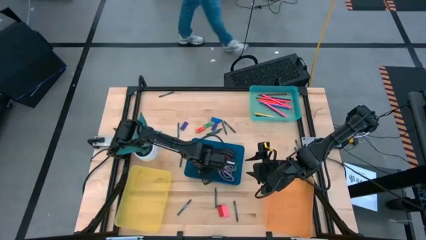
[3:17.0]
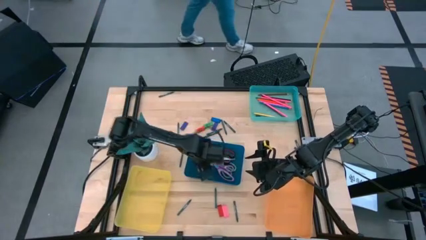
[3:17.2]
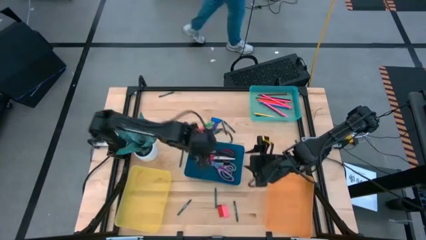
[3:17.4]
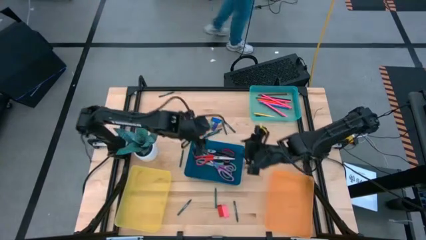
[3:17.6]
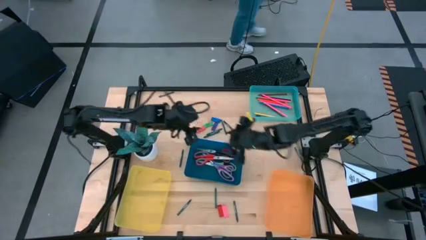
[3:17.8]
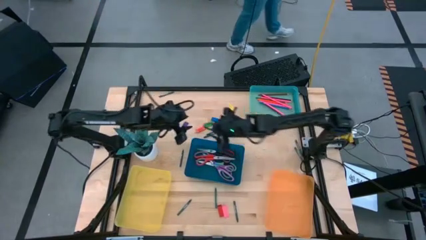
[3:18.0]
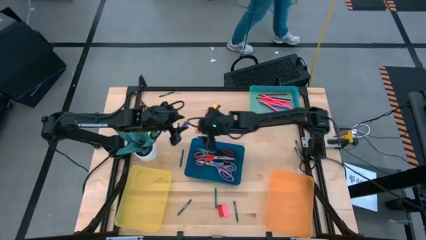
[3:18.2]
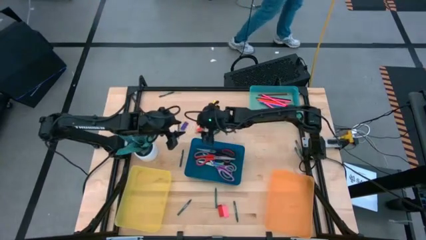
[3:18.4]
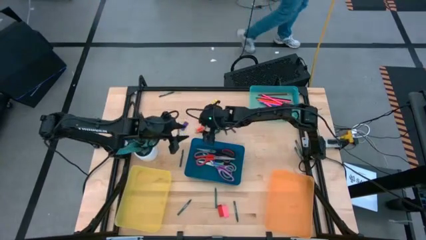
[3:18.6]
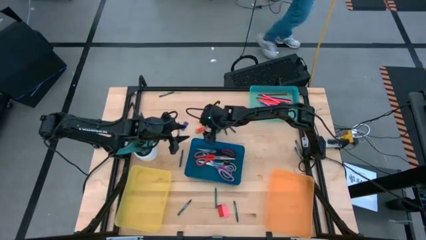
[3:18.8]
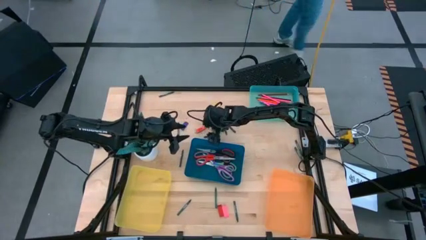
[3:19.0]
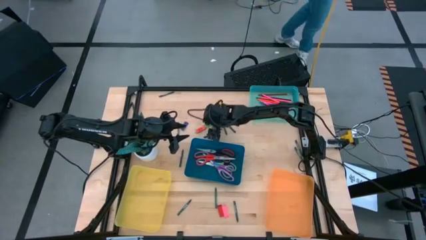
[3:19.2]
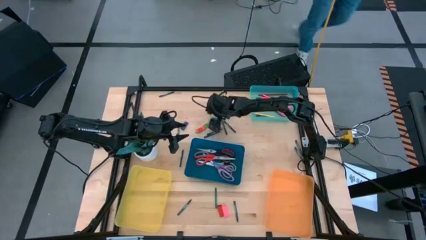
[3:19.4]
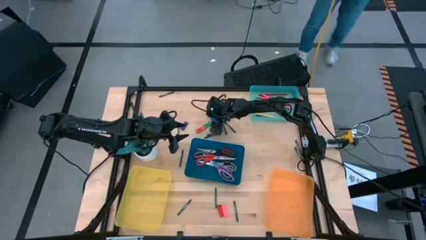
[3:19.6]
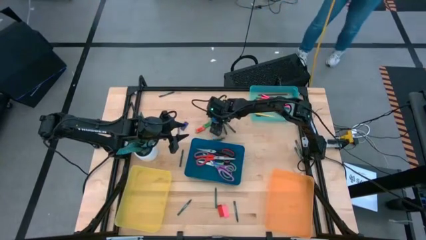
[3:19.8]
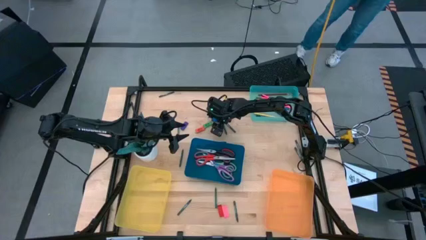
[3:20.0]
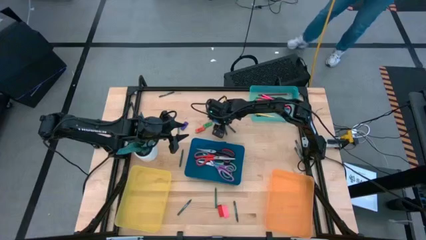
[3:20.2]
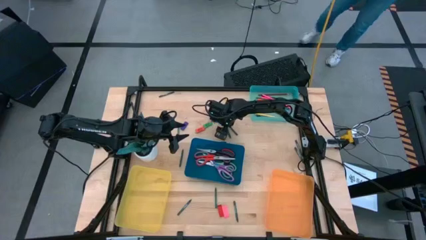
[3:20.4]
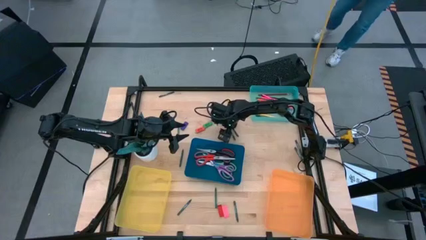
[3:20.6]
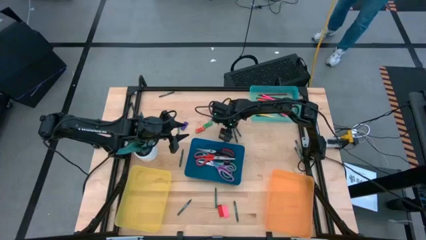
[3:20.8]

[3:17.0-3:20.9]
Task: Sort crayons/erasers/pens/pencils in bins
Adjust the blue eraser

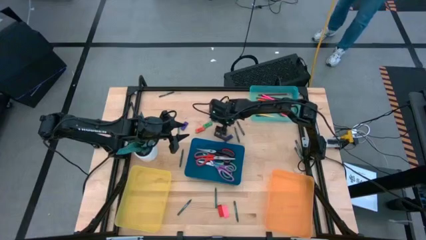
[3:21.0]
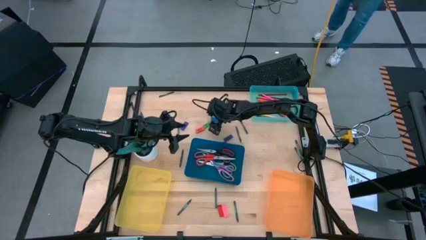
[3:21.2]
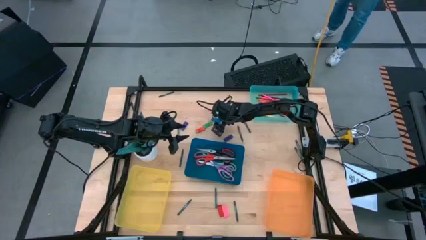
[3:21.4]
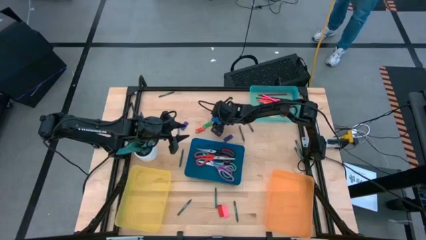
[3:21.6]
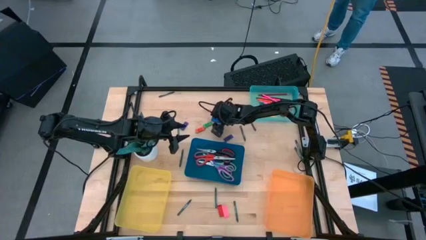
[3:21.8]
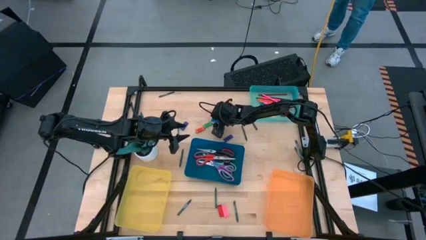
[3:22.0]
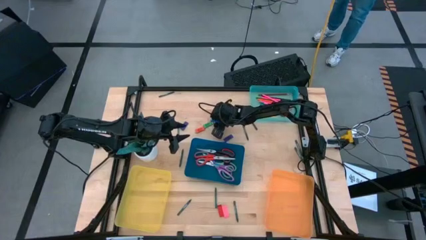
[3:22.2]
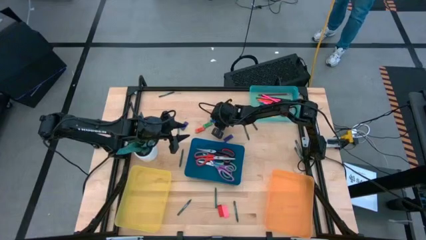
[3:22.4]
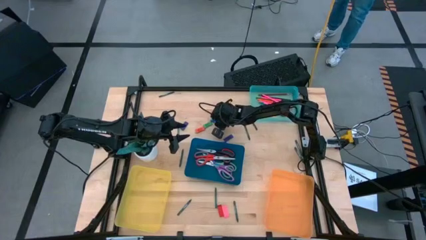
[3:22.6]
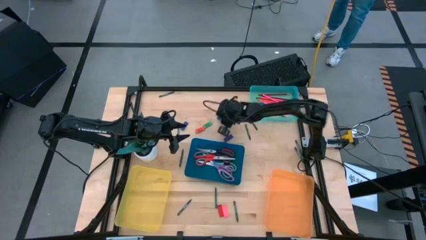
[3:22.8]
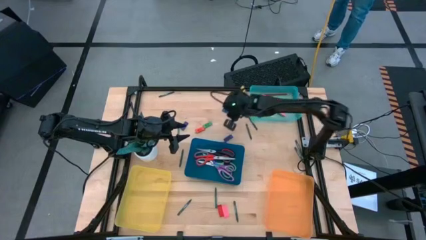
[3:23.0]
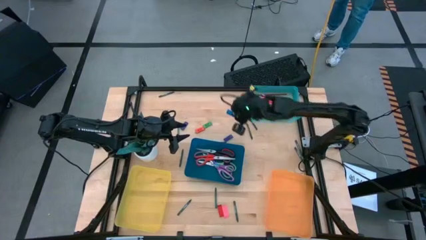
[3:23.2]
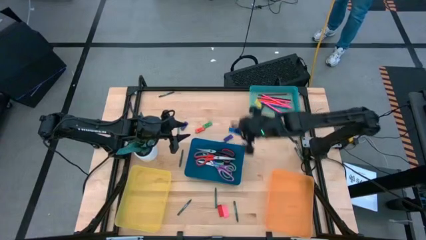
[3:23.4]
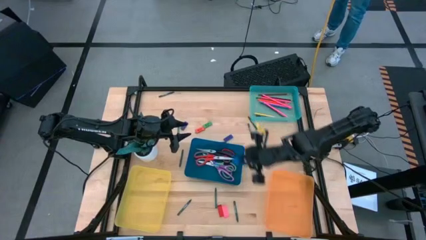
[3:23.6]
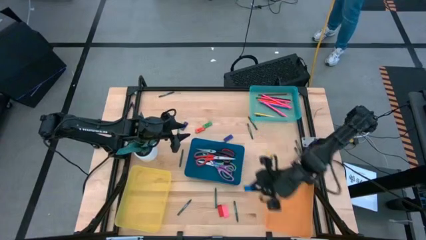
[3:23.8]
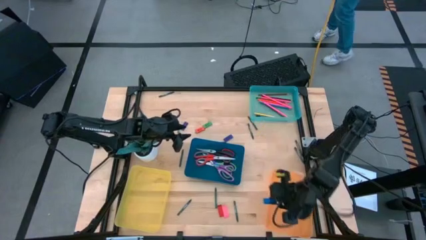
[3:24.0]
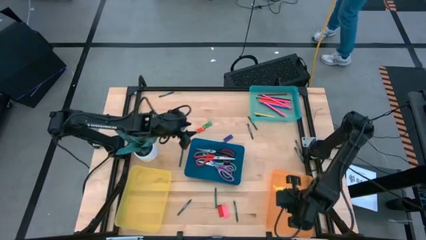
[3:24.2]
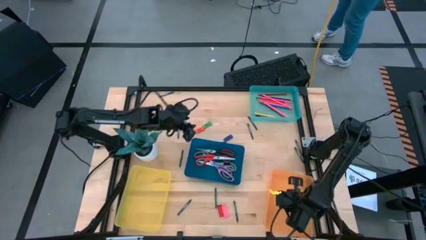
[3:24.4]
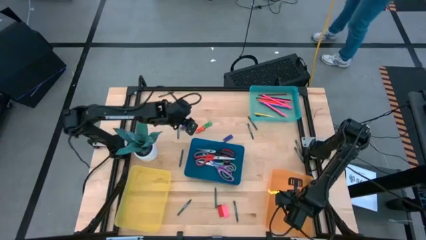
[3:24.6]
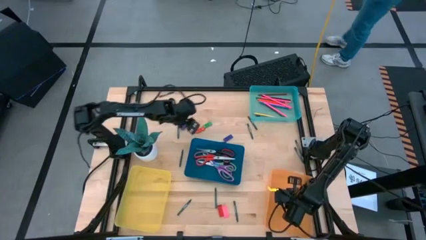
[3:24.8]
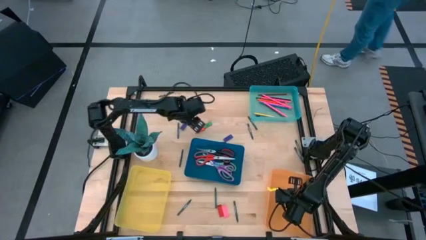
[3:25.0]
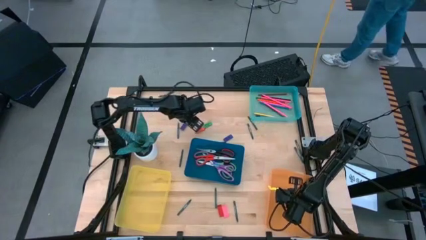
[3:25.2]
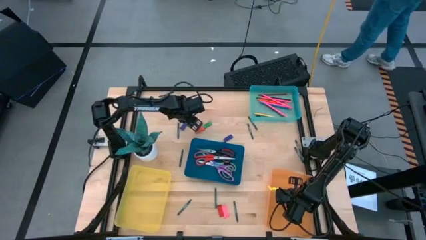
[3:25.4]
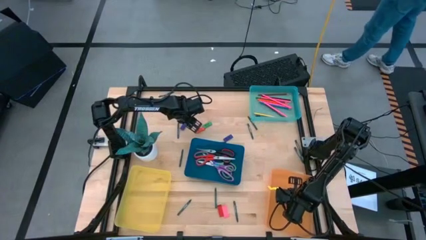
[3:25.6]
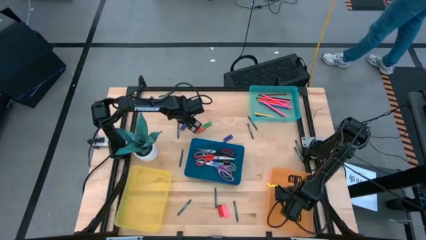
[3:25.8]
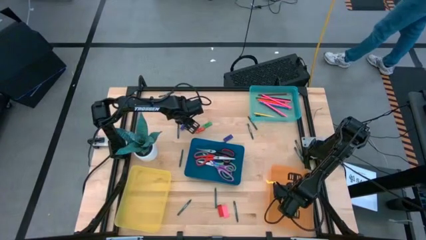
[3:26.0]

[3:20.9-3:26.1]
Put the blue eraser into the orange bin

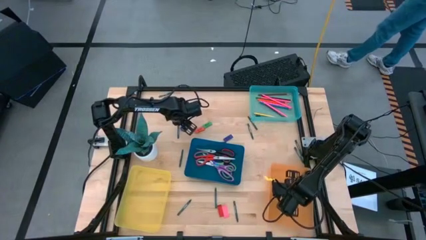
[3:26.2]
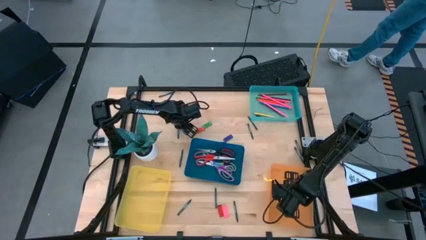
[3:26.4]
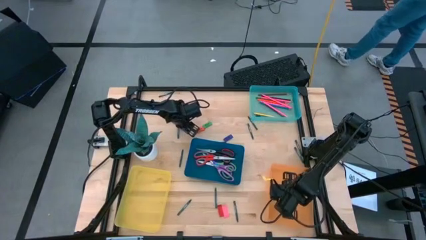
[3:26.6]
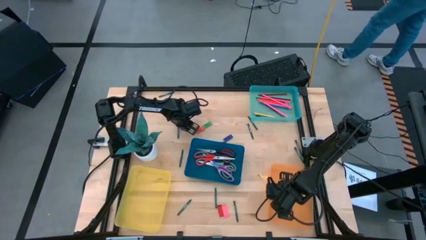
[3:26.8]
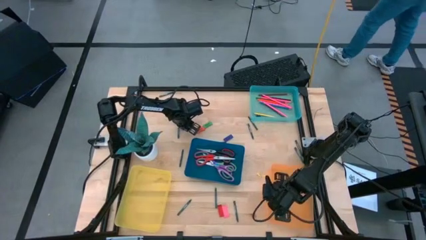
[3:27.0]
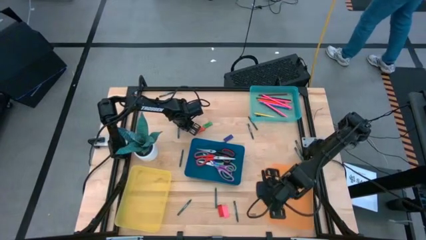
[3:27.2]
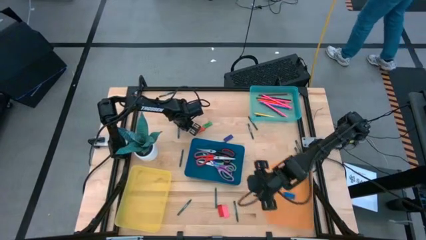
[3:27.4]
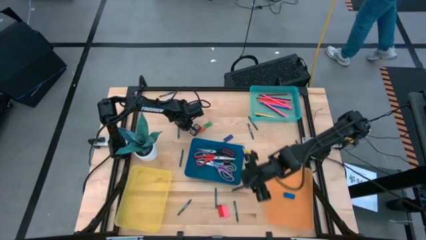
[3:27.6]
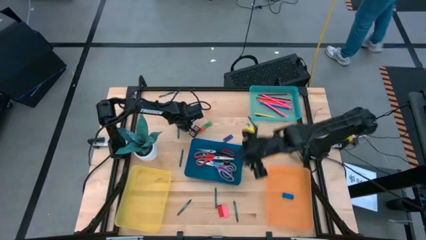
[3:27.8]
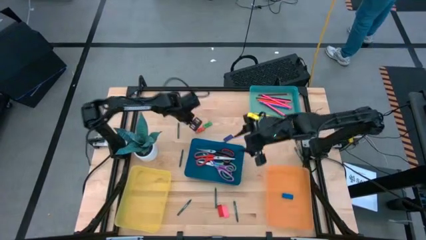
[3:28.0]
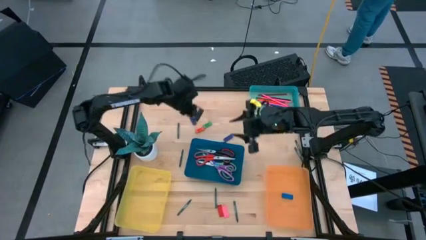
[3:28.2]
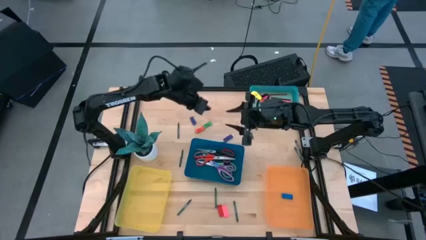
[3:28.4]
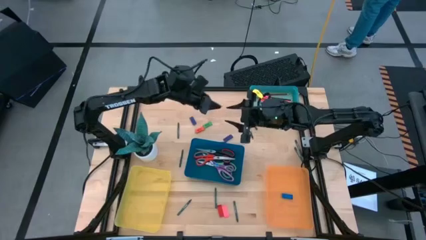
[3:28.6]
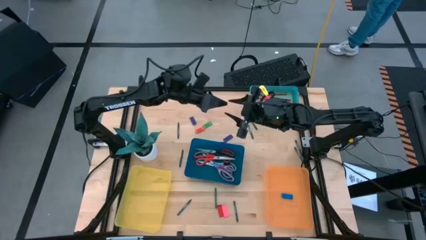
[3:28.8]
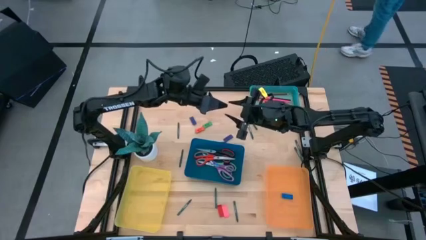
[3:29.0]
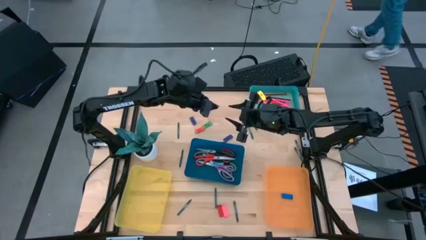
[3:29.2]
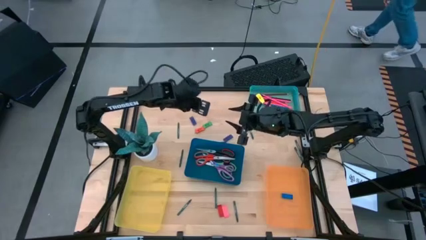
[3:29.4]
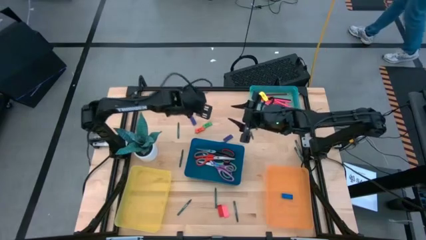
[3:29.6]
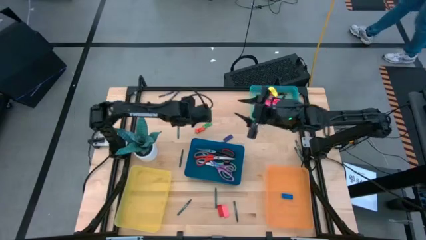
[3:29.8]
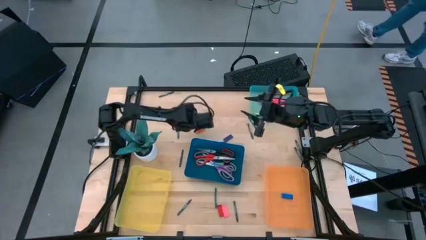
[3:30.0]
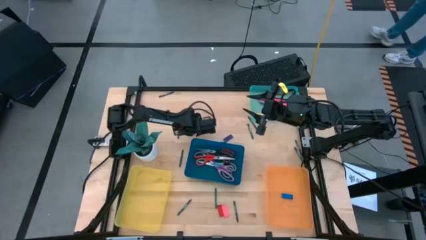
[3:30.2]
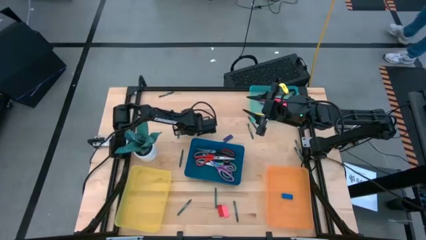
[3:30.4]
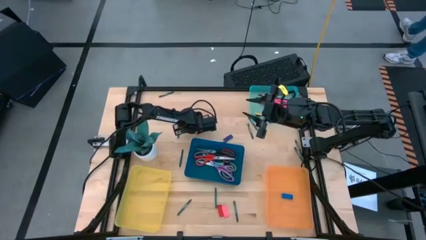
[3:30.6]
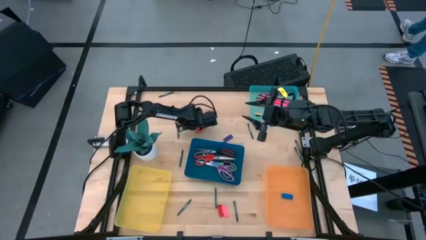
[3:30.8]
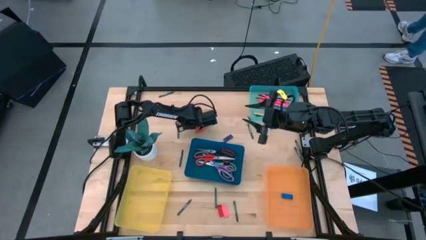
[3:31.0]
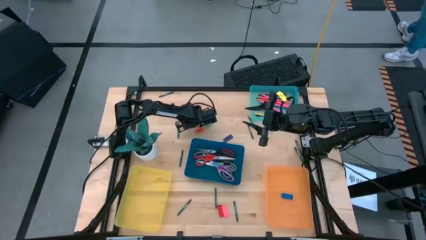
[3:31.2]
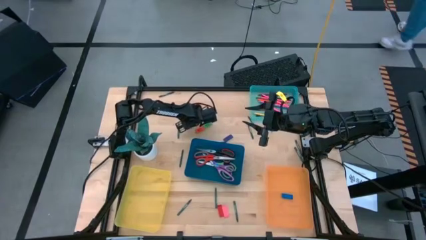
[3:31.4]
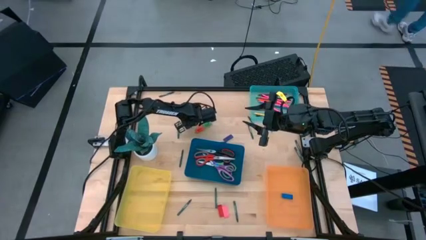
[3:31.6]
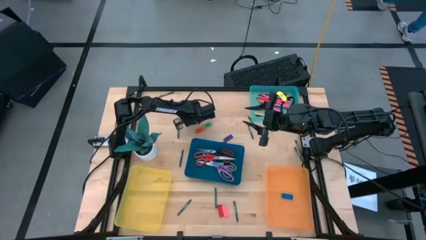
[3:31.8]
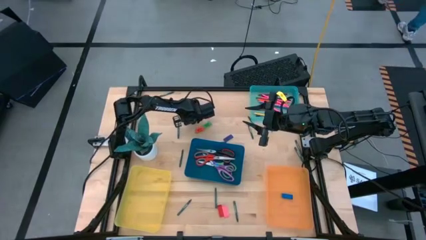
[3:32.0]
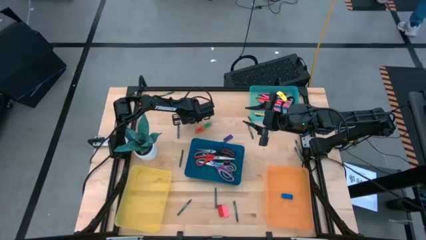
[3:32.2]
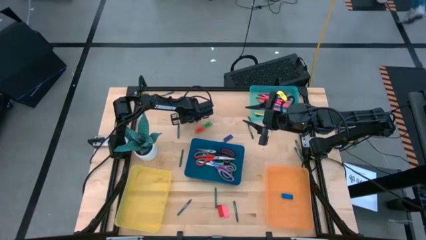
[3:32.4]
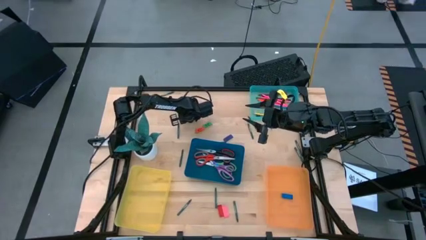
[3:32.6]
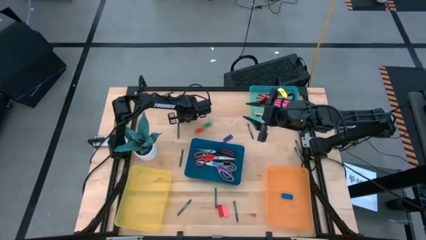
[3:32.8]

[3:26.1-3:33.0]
Put the purple eraser into the orange bin
